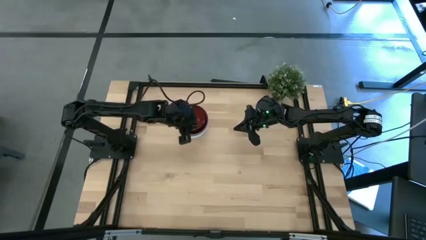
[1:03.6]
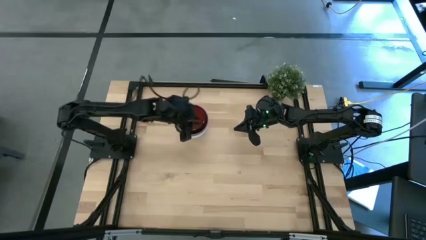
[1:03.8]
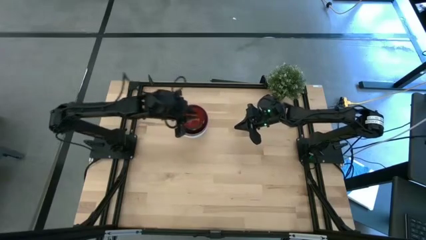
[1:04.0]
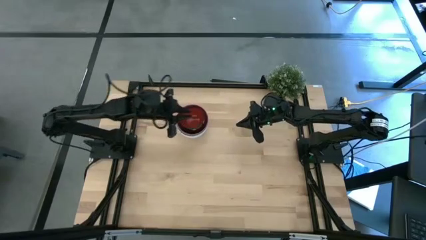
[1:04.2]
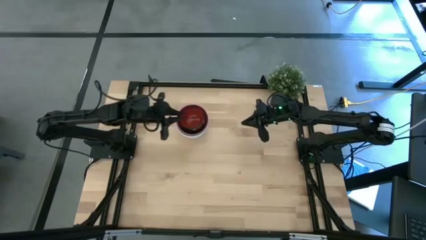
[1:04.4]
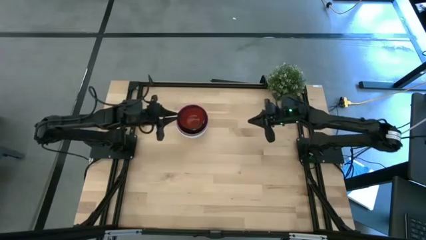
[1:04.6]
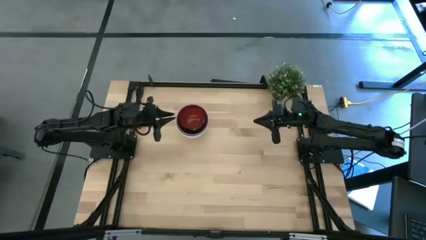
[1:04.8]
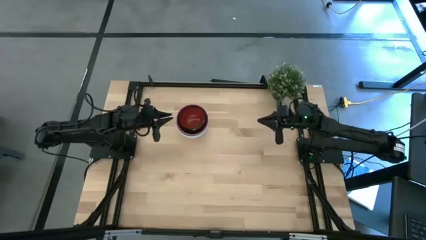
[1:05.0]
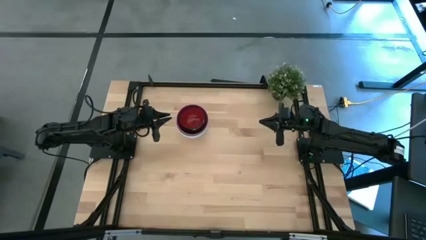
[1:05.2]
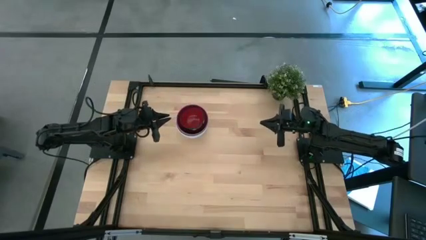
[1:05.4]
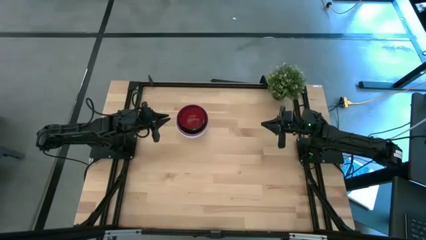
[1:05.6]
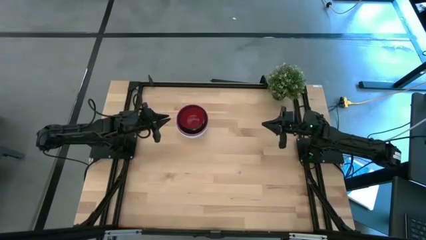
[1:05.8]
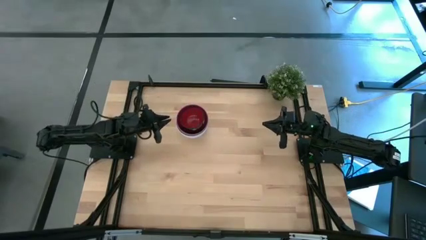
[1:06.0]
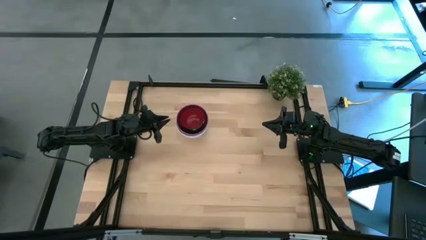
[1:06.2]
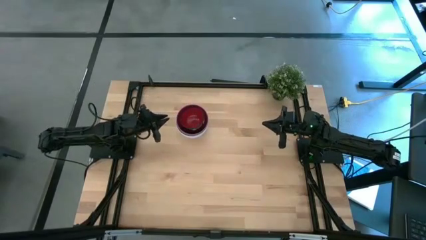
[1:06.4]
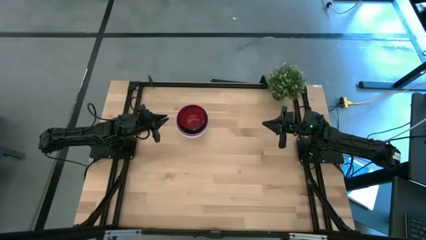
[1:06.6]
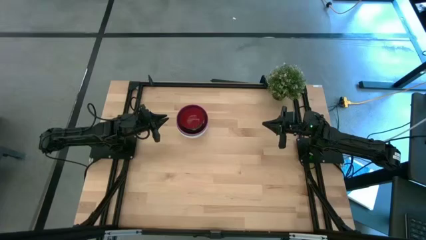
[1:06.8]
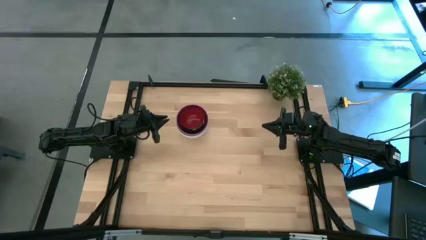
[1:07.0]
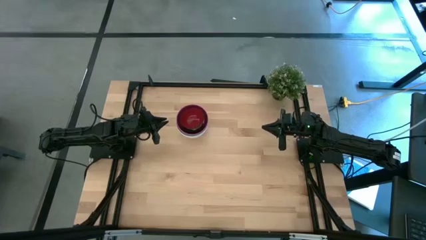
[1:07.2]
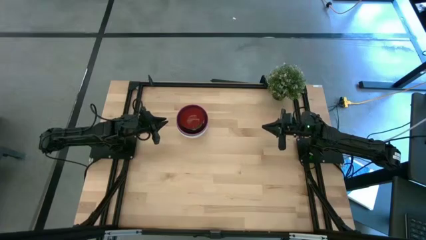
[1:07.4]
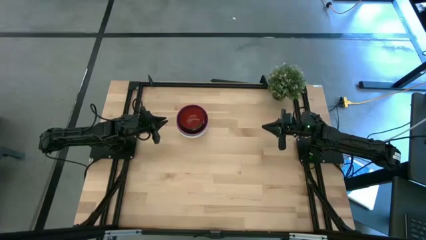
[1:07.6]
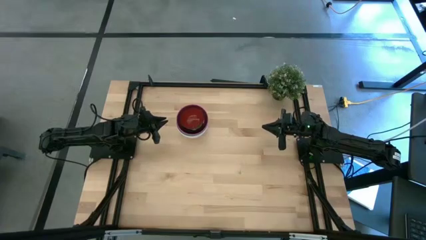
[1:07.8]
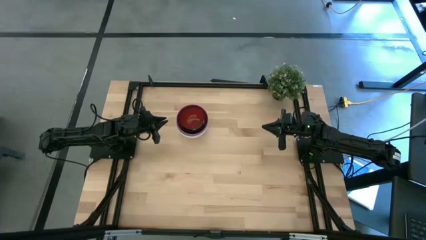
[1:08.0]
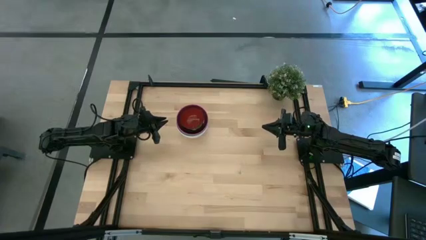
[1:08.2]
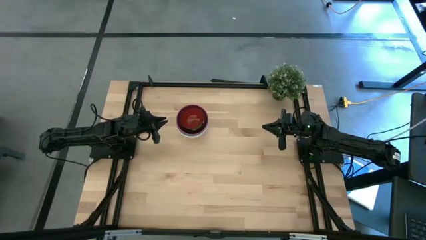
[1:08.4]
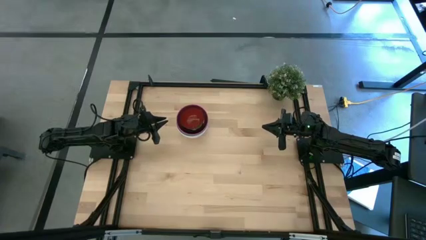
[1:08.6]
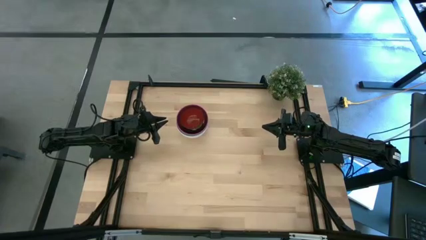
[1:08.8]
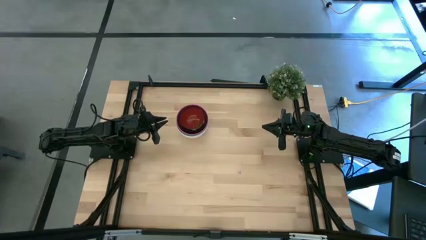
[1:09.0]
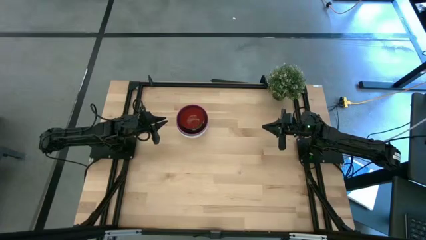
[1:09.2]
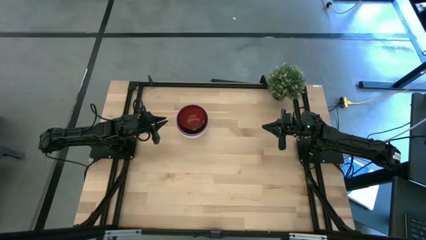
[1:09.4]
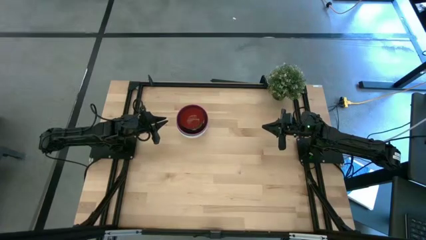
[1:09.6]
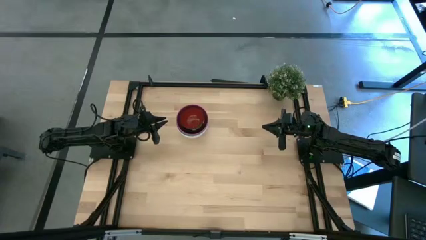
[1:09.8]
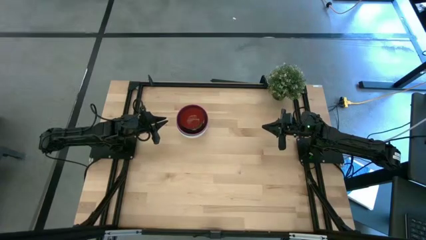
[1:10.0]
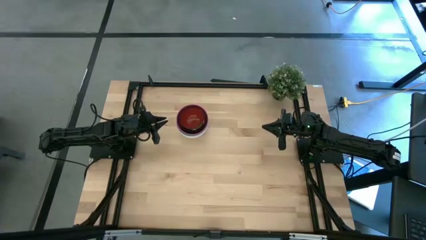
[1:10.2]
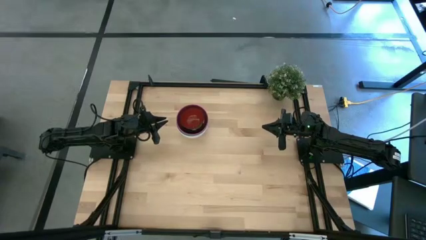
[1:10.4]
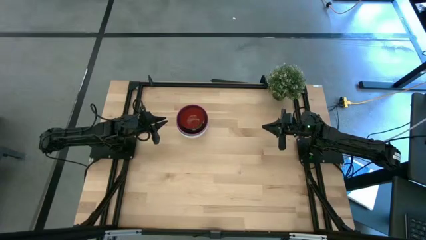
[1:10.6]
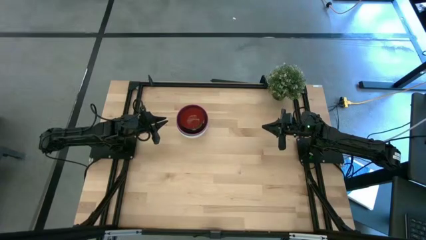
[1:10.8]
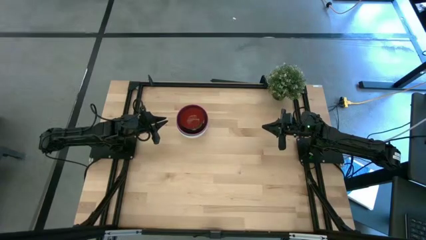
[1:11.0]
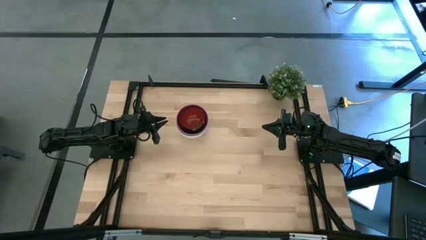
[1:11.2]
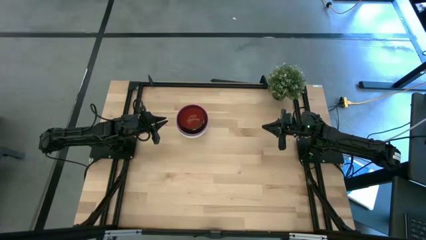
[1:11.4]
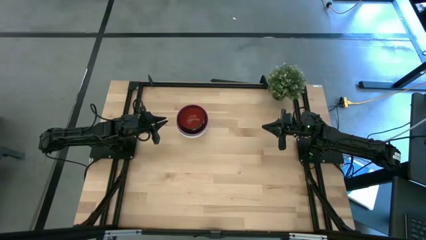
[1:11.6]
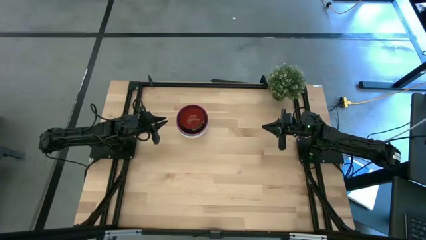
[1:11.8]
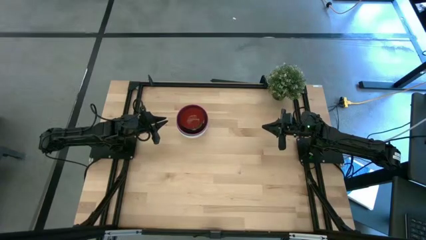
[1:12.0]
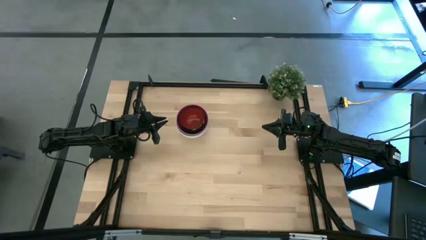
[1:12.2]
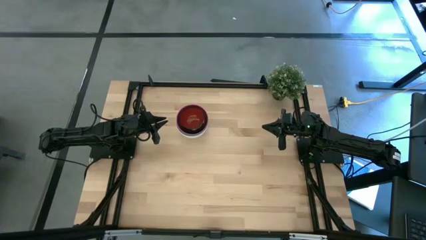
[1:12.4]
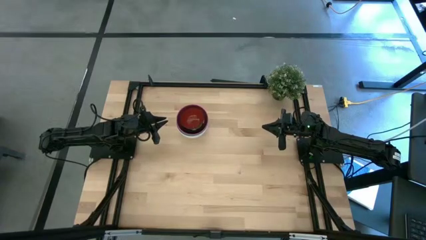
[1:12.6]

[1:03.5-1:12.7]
Task: Nest bowls inside each other
Return to Home Position

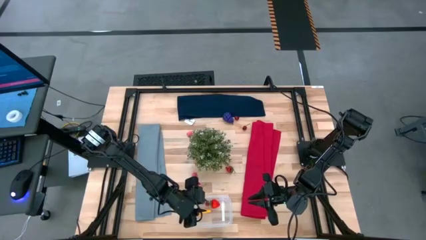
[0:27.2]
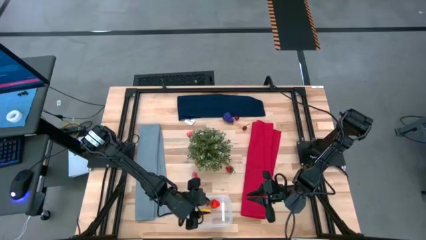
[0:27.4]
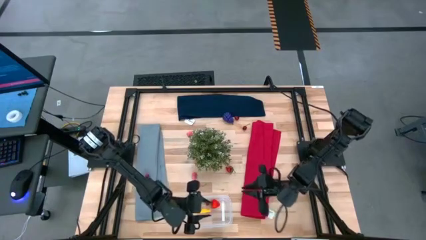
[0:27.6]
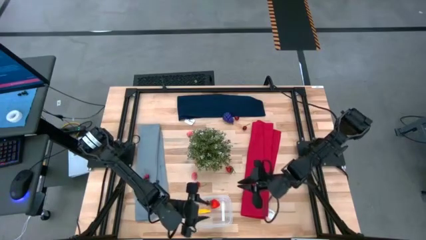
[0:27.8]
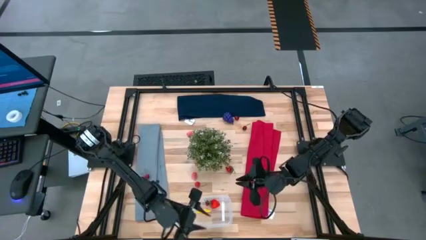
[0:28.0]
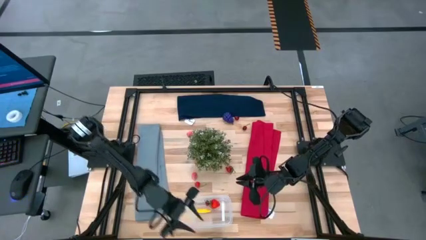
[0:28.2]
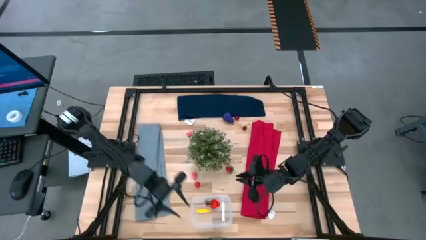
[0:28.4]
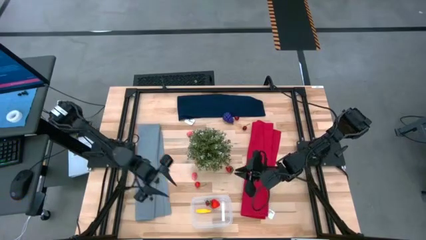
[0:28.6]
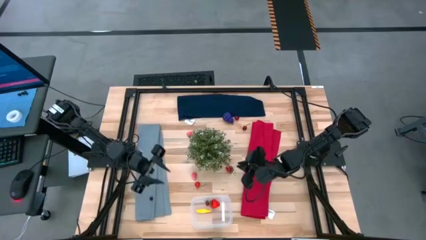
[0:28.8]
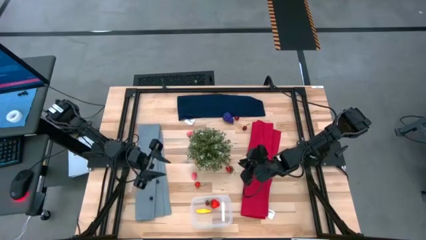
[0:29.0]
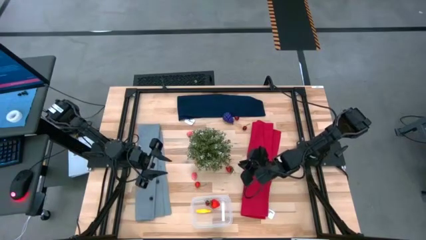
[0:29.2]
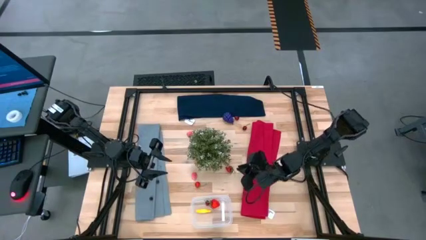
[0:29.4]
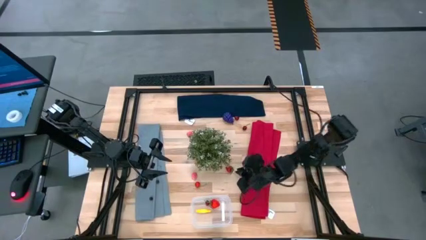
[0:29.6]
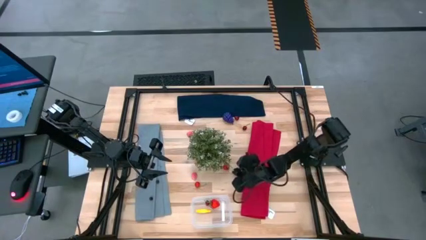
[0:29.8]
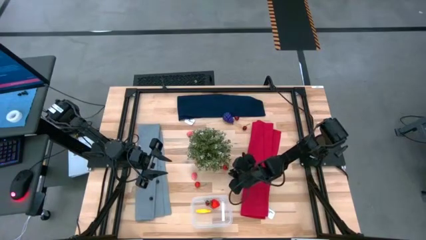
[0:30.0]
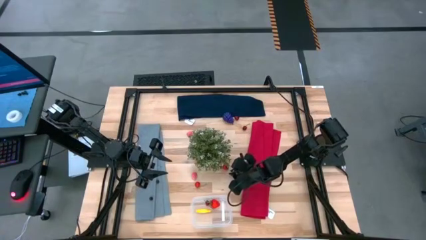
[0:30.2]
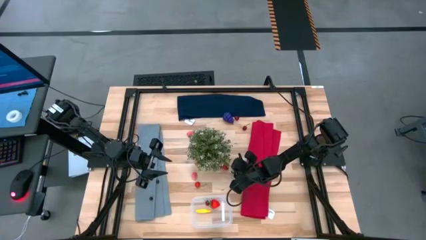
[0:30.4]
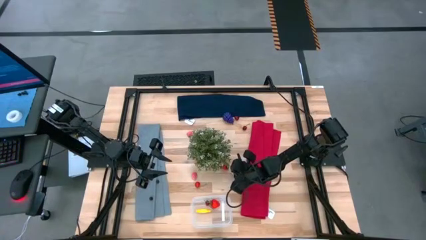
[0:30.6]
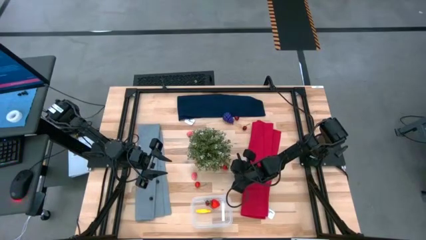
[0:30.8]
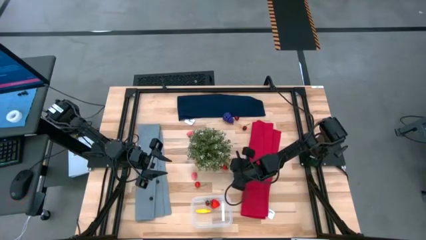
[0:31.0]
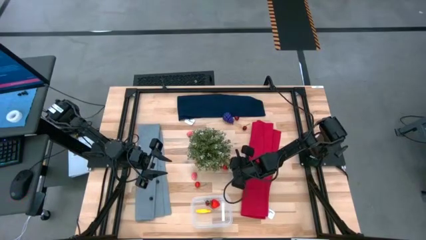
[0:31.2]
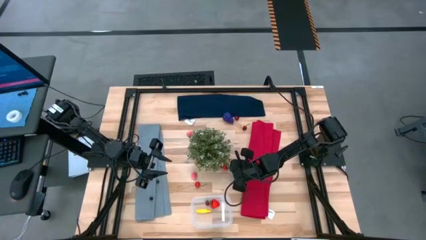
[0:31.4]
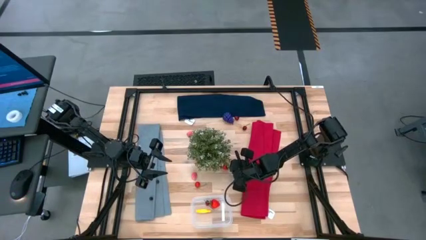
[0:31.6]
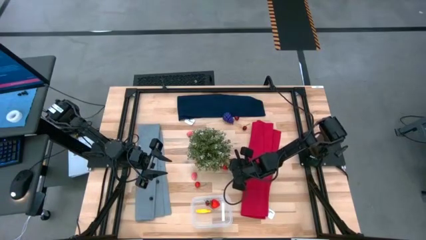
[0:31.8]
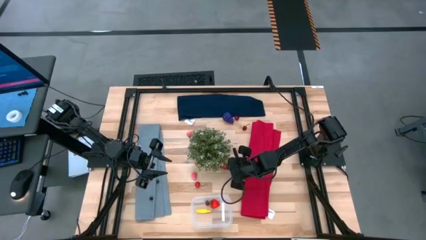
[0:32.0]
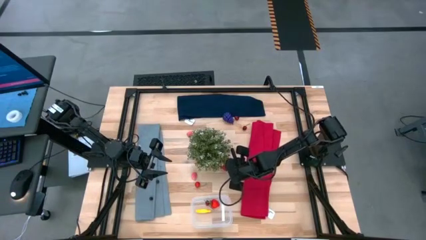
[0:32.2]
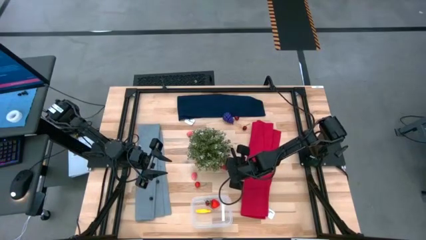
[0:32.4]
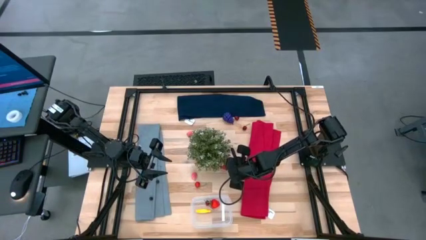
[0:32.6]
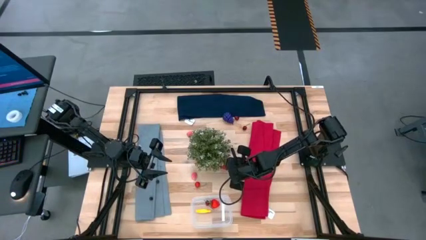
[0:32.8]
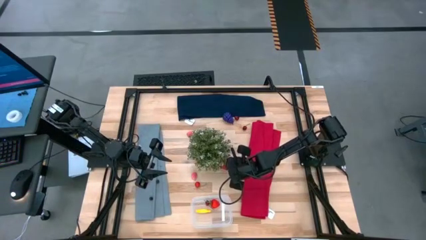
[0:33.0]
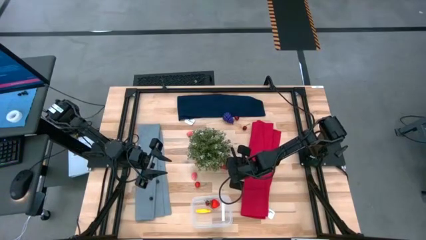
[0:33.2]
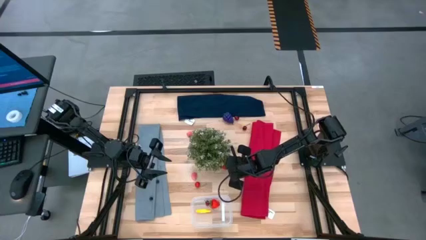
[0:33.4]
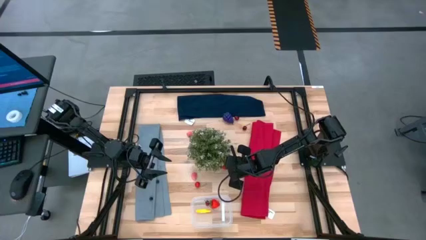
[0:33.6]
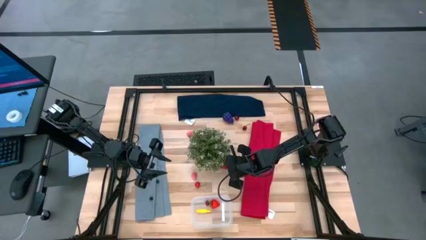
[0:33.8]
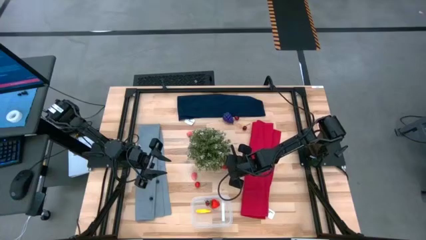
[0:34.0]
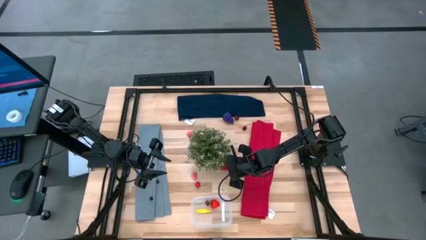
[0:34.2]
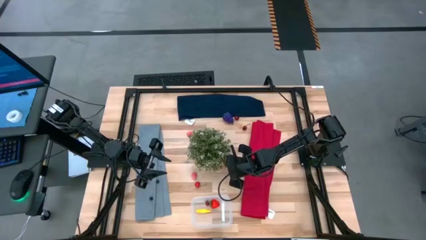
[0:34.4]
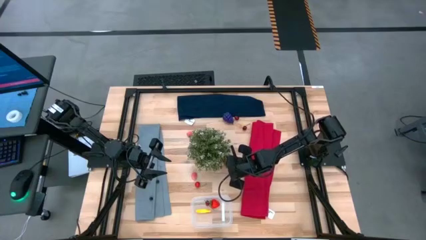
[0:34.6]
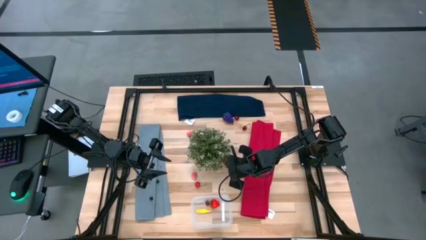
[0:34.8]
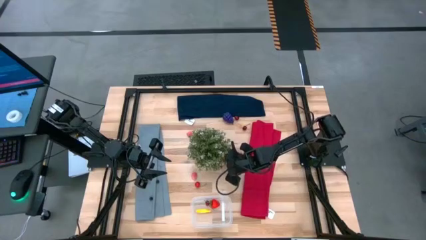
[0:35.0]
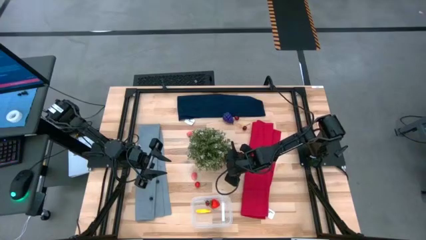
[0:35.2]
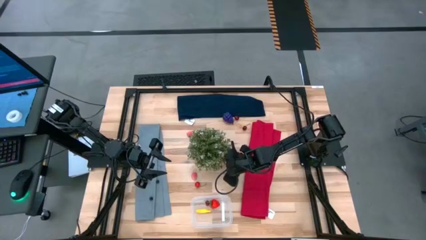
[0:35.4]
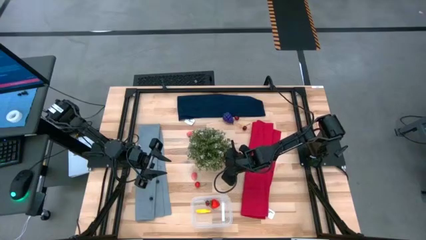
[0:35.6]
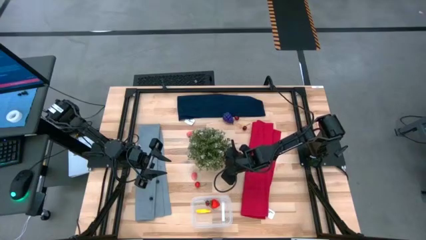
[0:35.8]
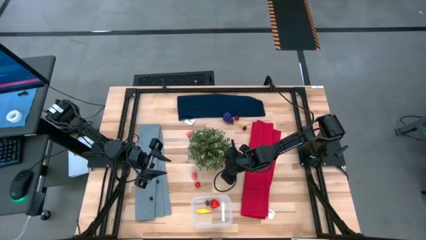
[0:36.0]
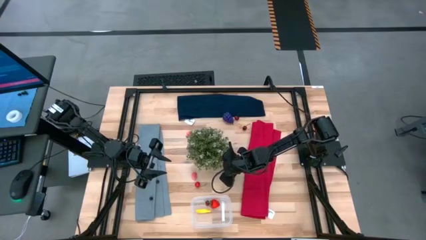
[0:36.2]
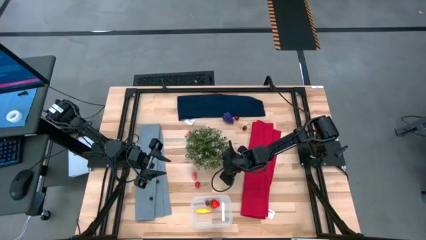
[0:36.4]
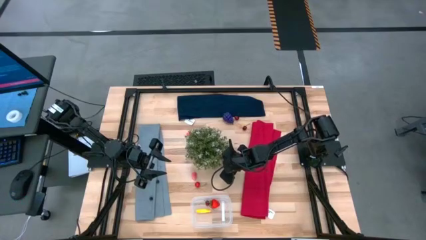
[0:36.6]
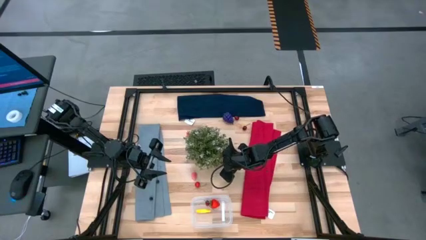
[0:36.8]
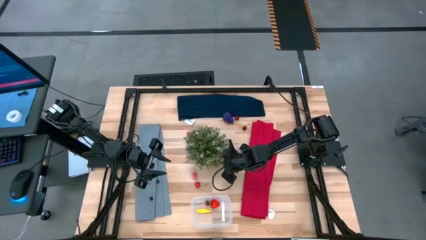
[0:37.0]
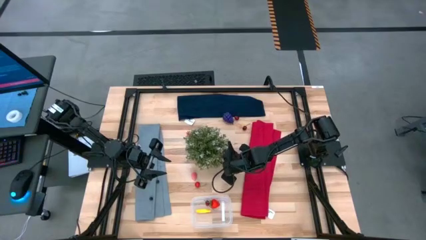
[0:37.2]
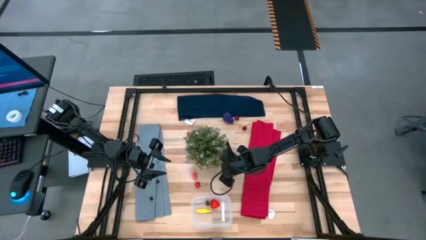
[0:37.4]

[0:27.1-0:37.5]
Task: Pick and placing Produce into tupperware
Put the strawberry into the transparent container
